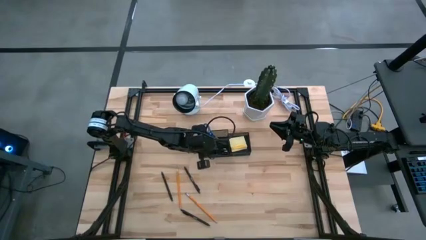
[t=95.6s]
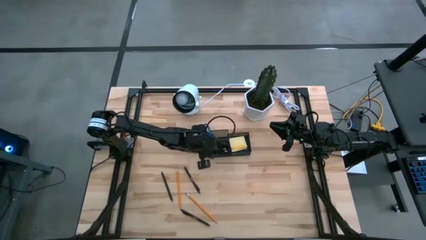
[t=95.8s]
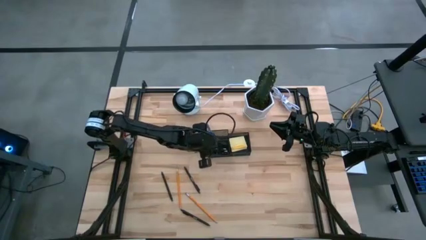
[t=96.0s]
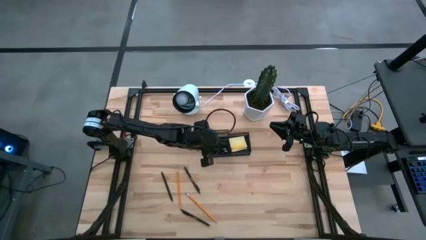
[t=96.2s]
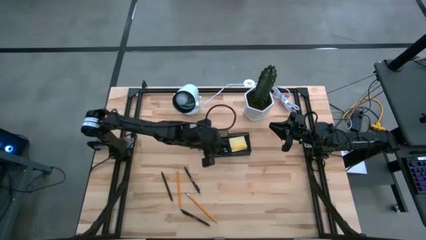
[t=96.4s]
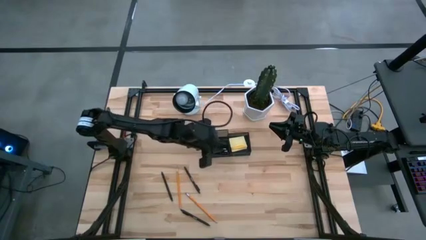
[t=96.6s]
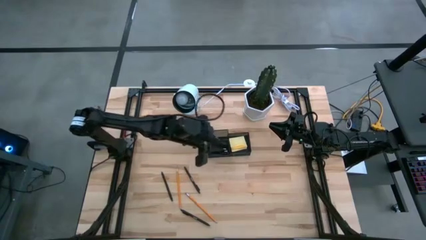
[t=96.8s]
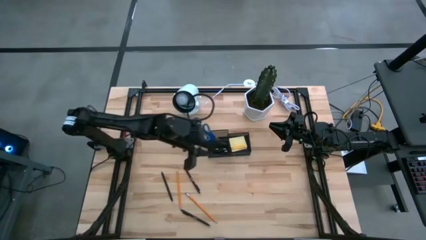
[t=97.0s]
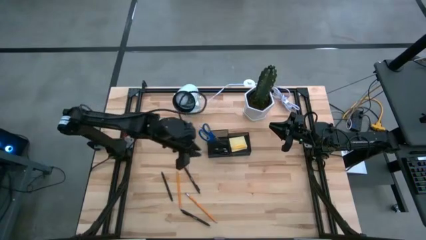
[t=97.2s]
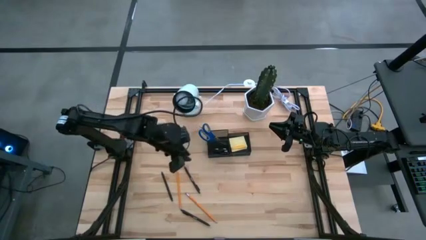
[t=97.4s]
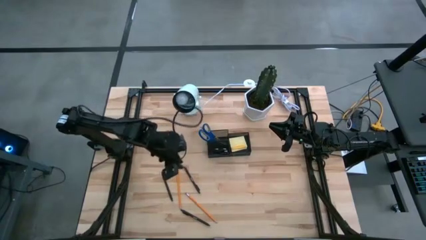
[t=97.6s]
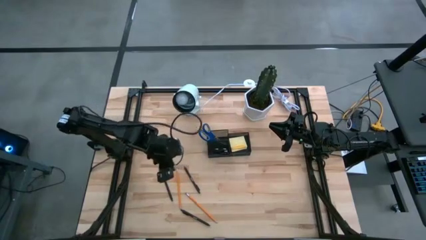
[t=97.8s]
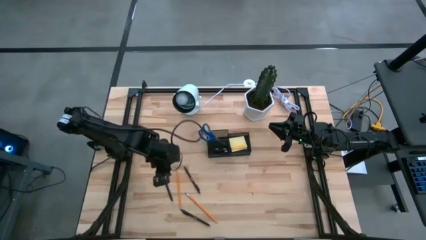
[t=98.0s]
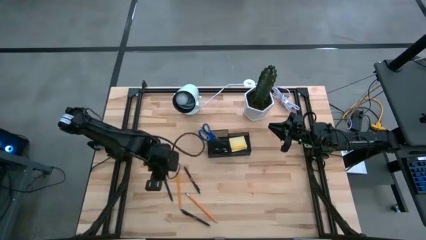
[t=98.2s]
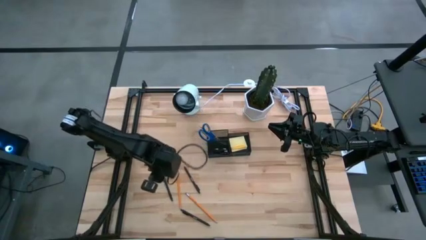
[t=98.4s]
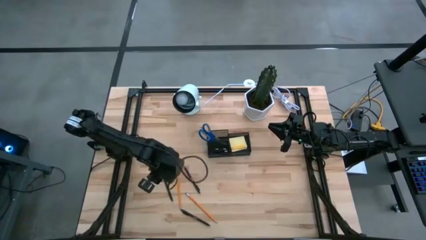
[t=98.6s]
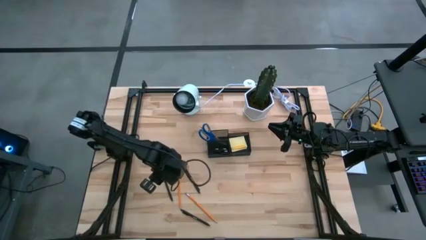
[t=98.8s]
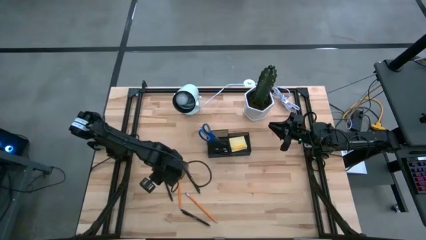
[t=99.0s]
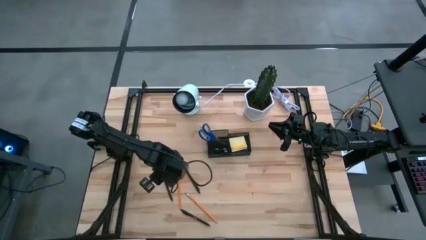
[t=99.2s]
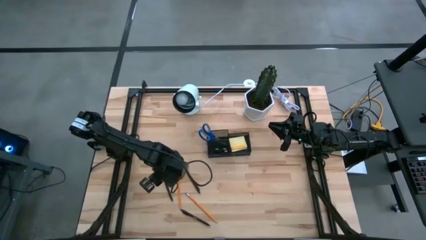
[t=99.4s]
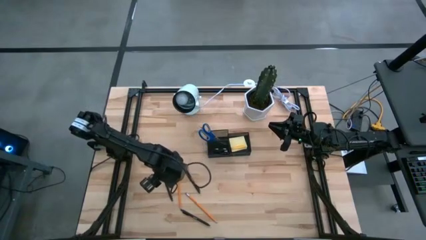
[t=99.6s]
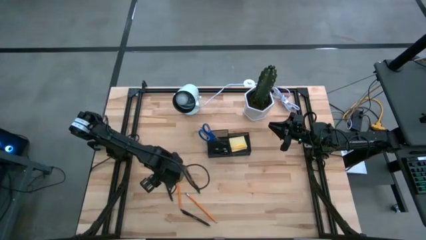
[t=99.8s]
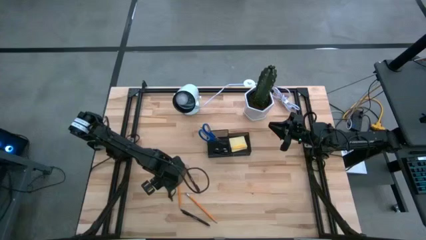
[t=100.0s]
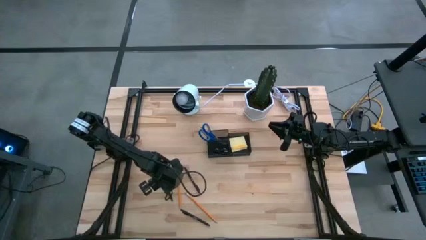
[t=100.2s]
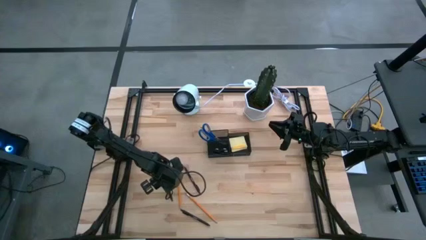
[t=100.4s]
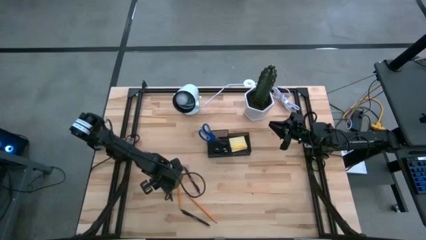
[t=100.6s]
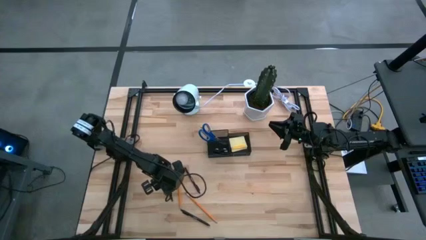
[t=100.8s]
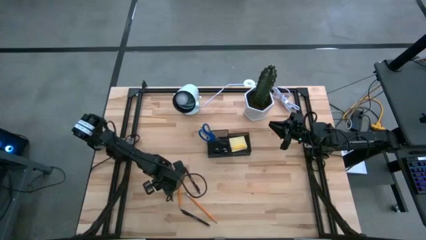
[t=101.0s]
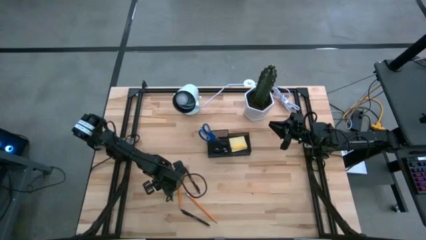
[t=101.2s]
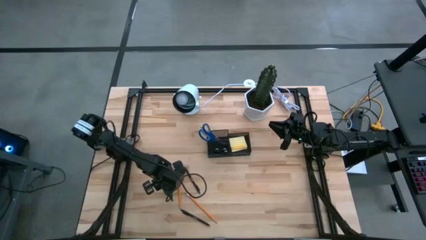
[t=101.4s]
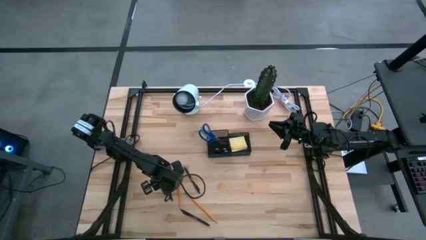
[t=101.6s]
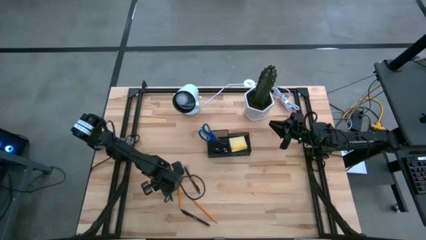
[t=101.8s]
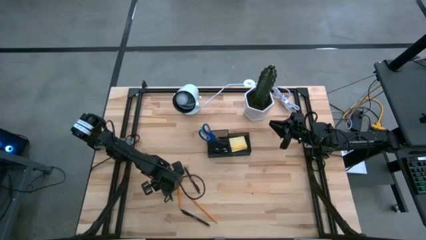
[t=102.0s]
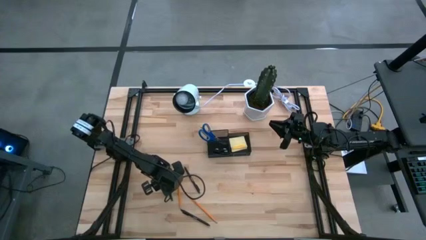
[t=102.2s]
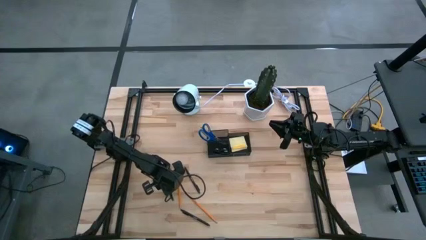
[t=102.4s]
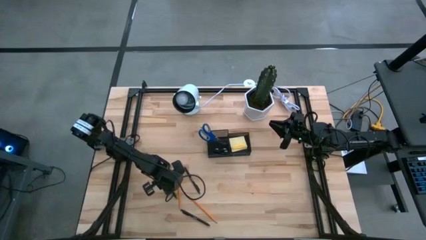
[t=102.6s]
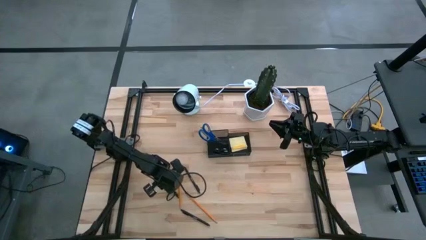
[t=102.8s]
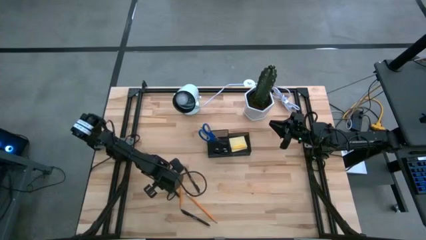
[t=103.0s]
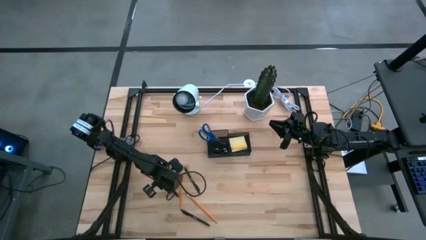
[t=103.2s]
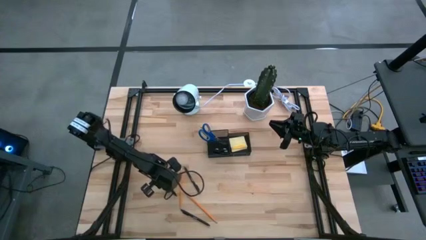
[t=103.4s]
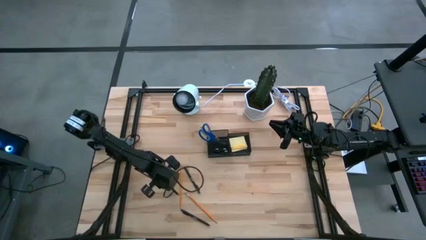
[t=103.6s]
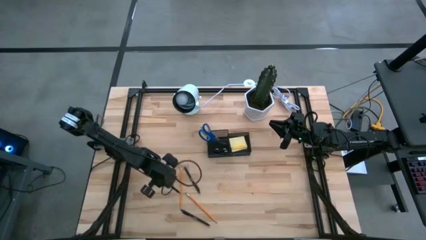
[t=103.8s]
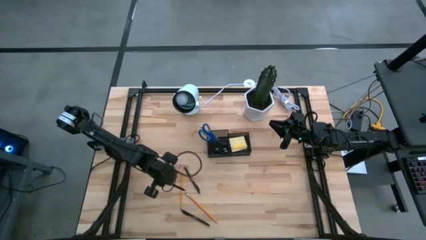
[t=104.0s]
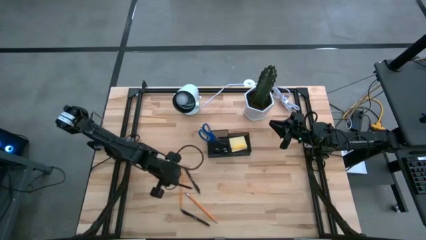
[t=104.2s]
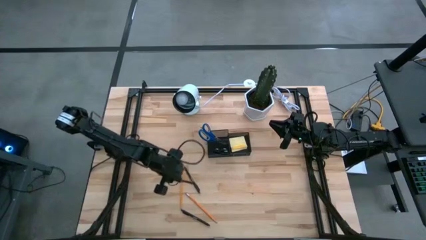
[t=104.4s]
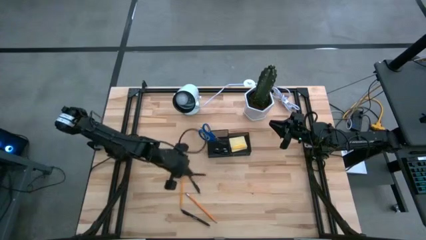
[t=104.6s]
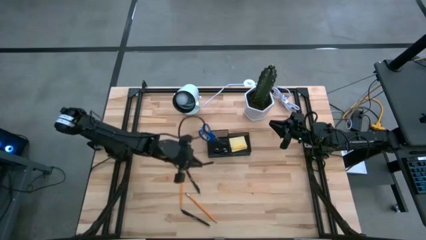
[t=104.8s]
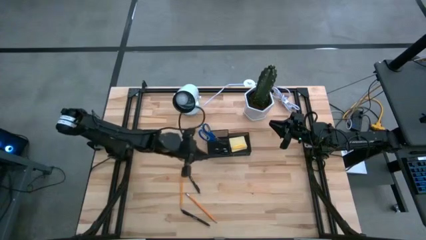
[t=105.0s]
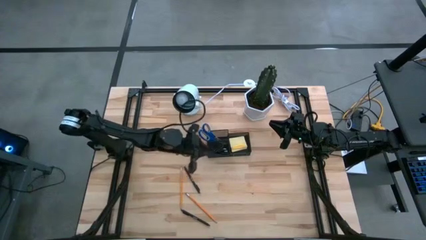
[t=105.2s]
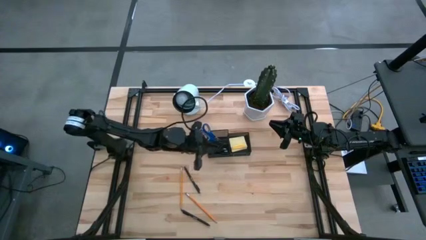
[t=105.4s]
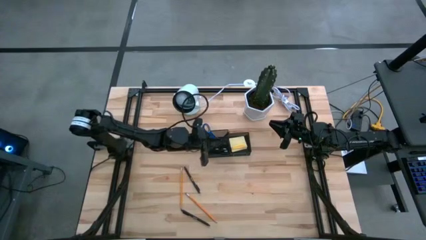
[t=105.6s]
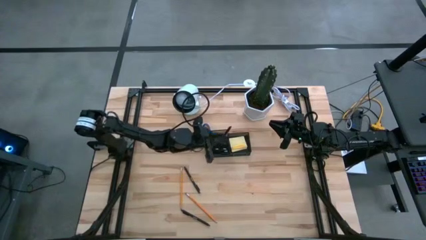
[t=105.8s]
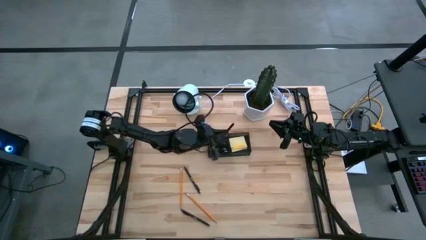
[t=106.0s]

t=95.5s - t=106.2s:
Task: Pick and place office supplies into organizer
Put the top left black pen into the black desk organizer
